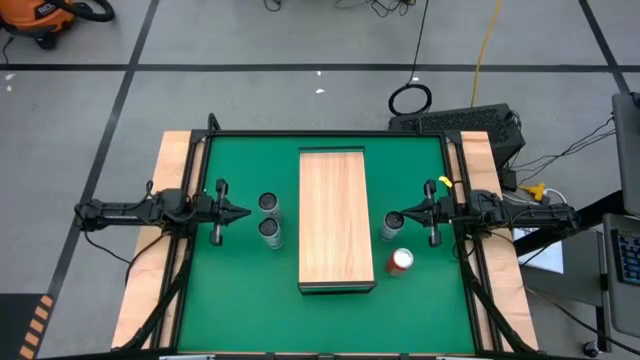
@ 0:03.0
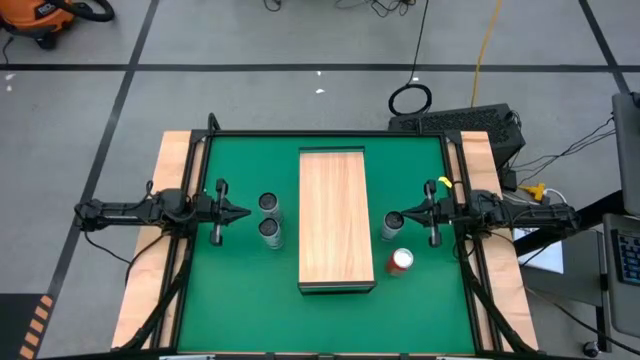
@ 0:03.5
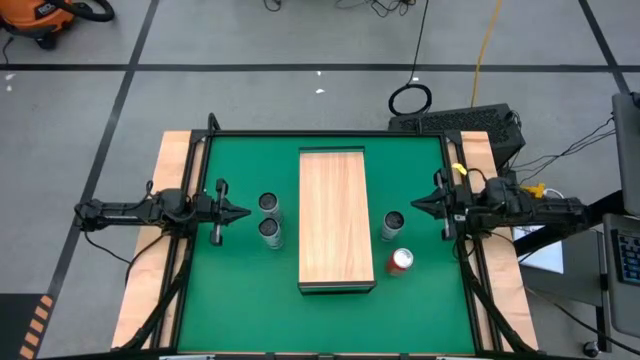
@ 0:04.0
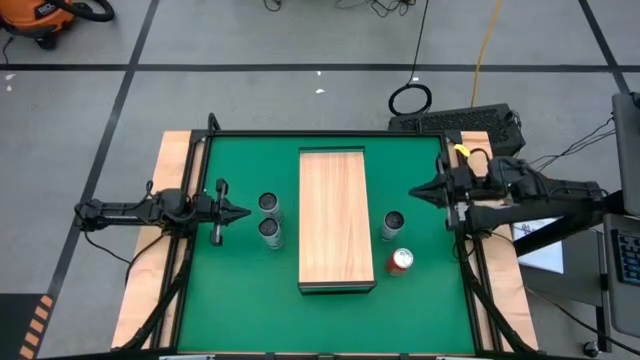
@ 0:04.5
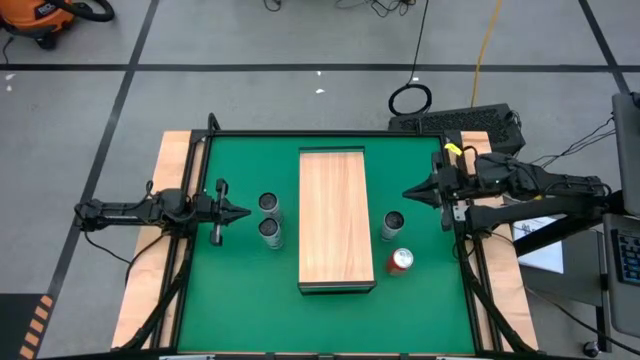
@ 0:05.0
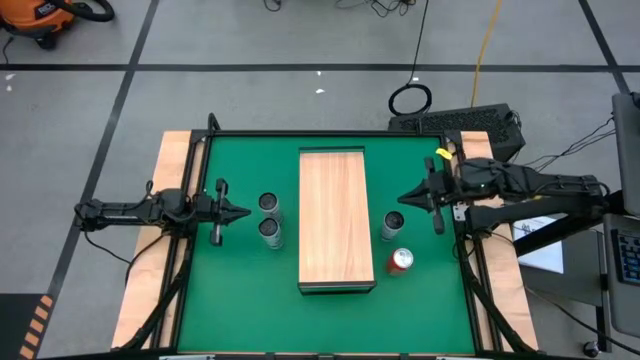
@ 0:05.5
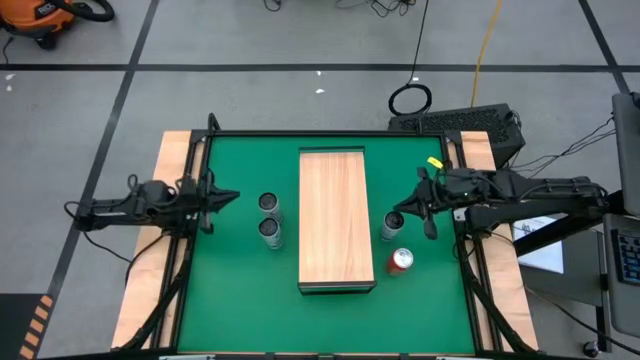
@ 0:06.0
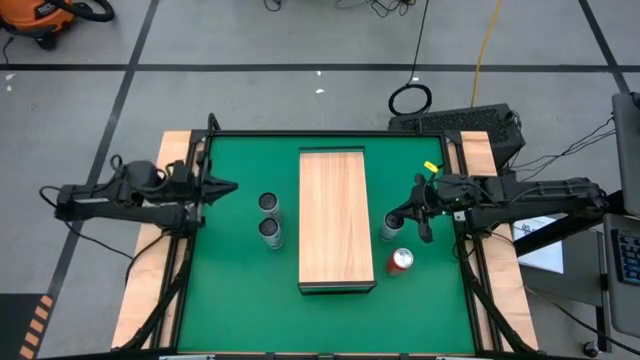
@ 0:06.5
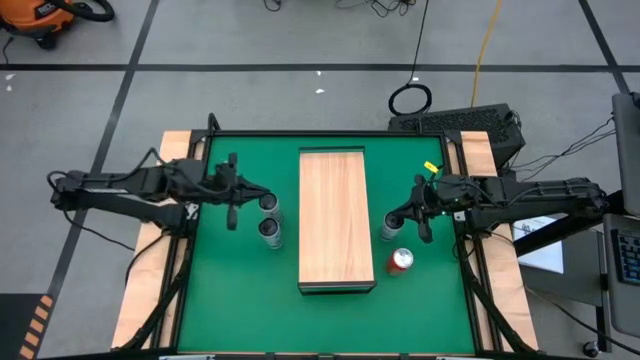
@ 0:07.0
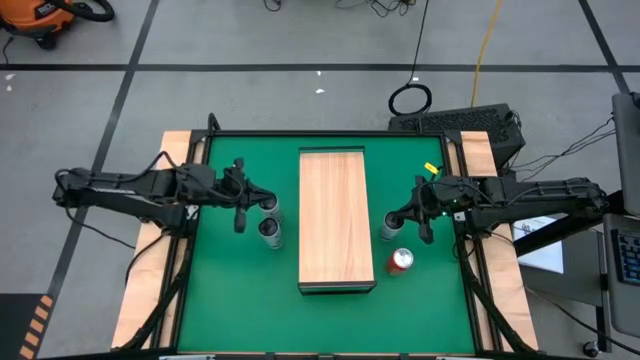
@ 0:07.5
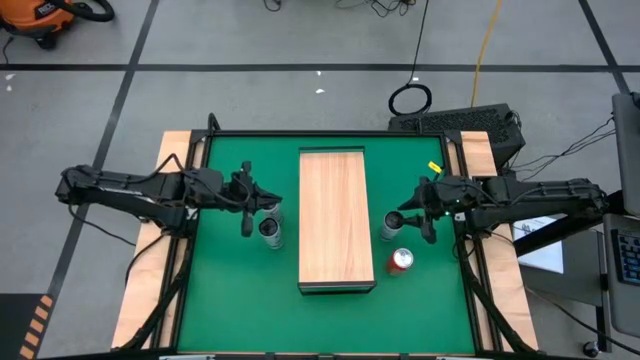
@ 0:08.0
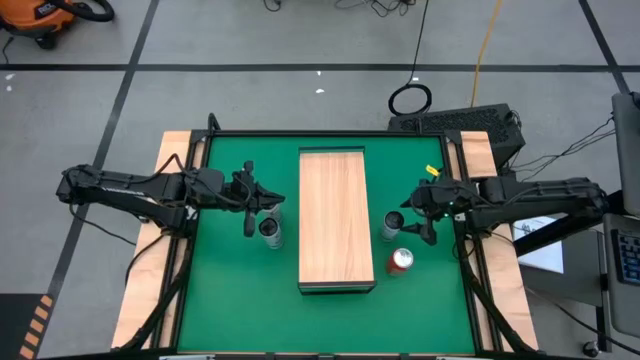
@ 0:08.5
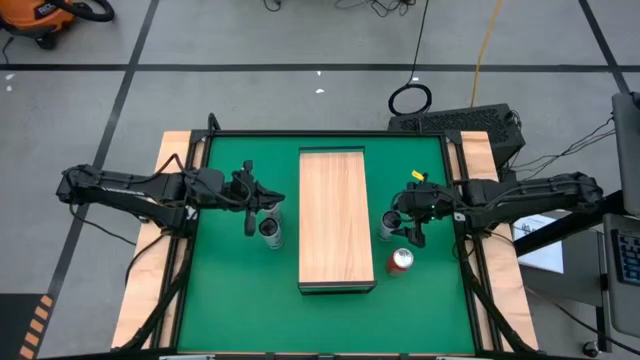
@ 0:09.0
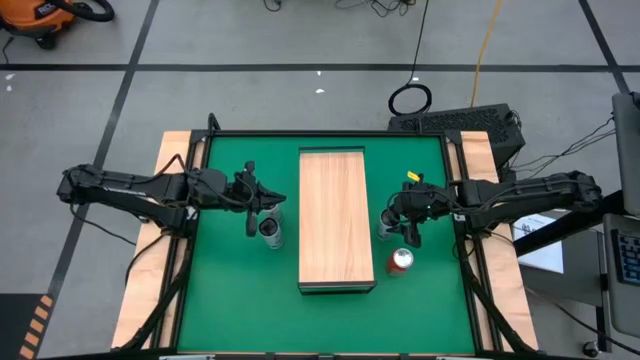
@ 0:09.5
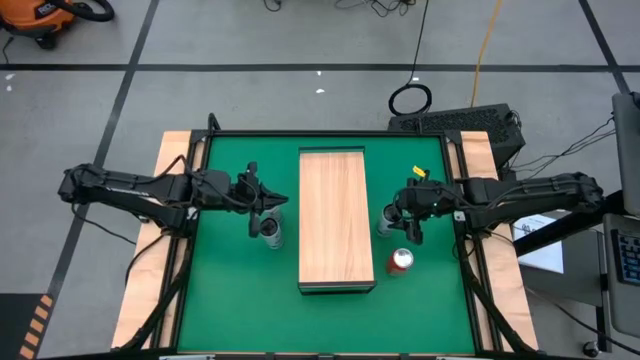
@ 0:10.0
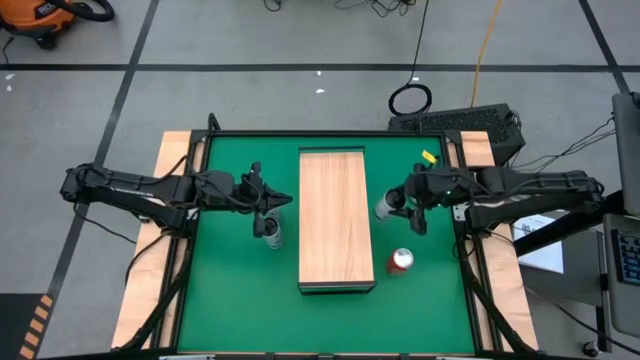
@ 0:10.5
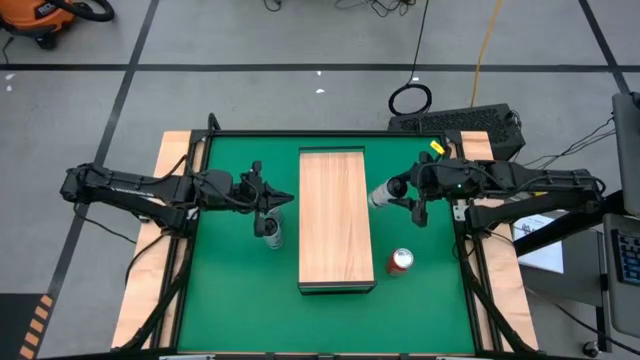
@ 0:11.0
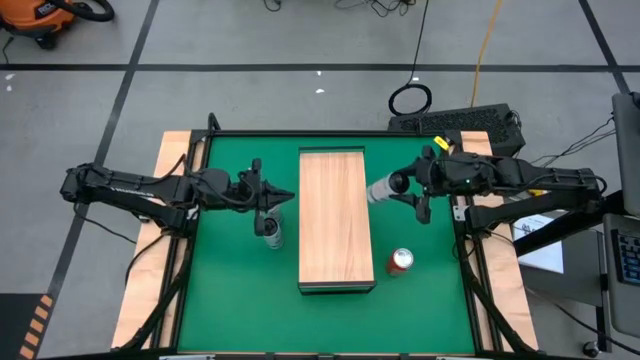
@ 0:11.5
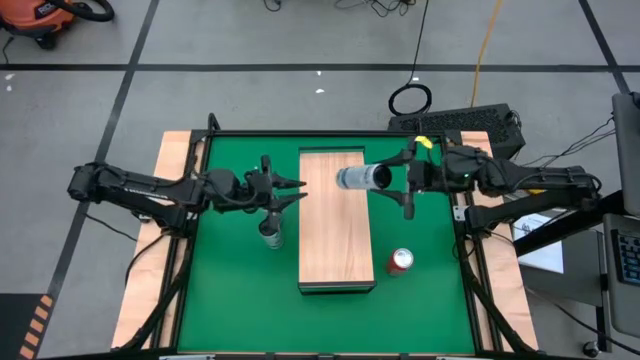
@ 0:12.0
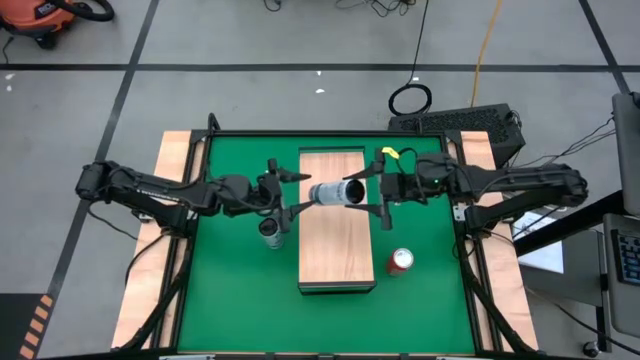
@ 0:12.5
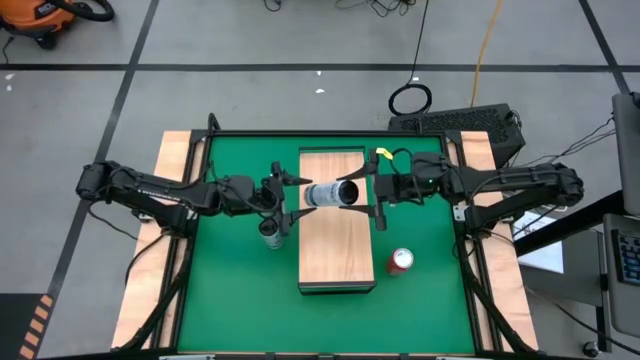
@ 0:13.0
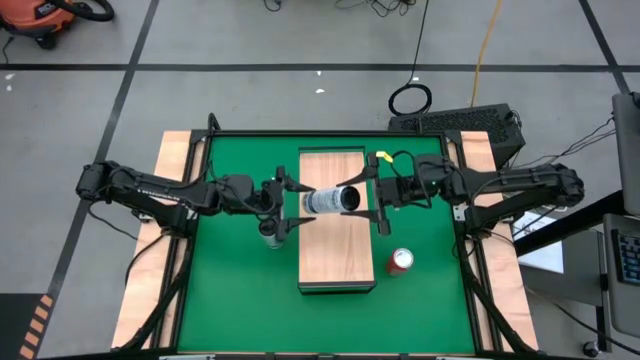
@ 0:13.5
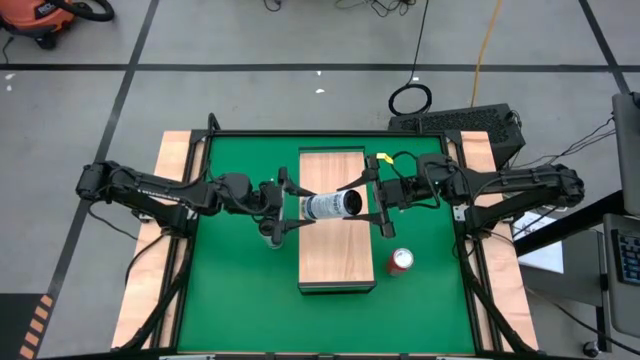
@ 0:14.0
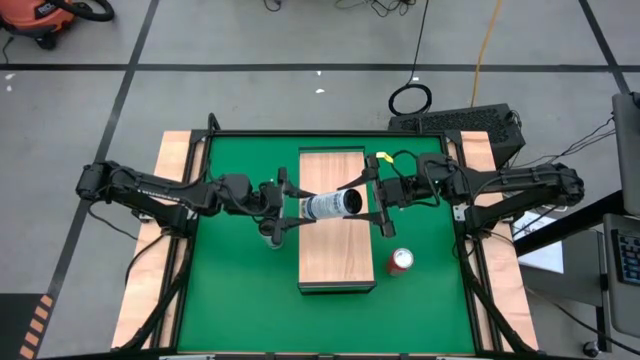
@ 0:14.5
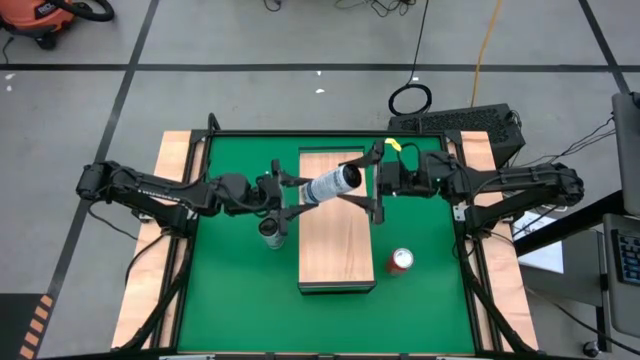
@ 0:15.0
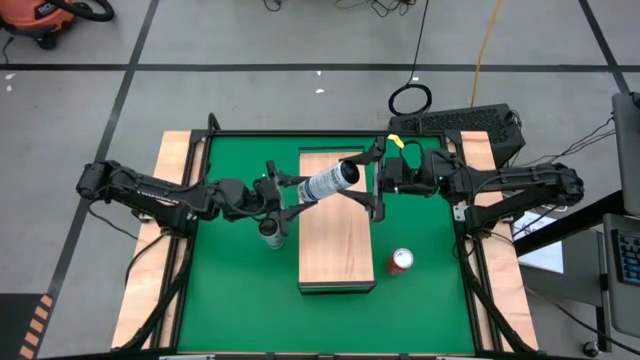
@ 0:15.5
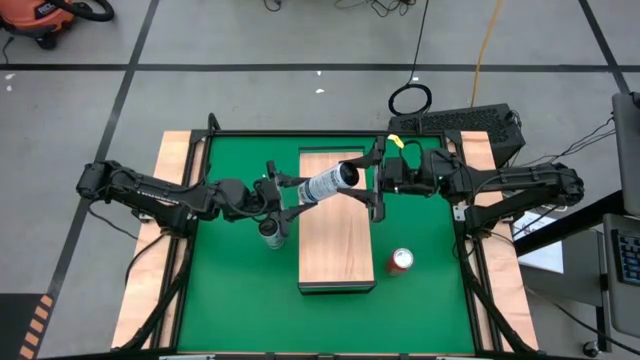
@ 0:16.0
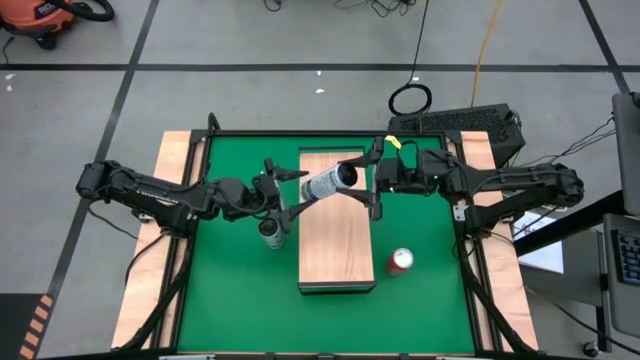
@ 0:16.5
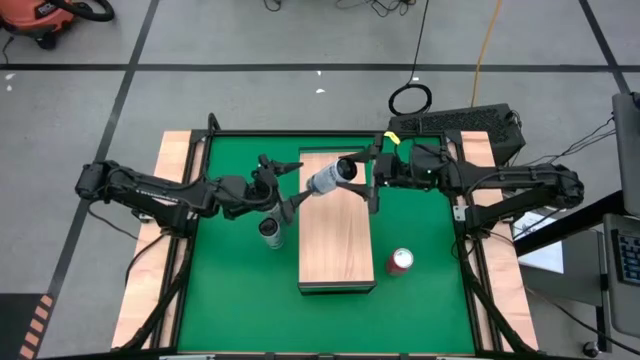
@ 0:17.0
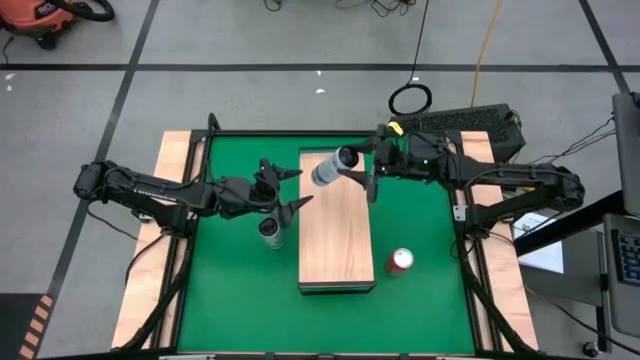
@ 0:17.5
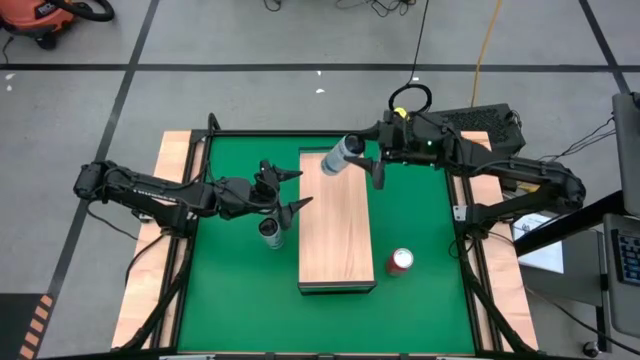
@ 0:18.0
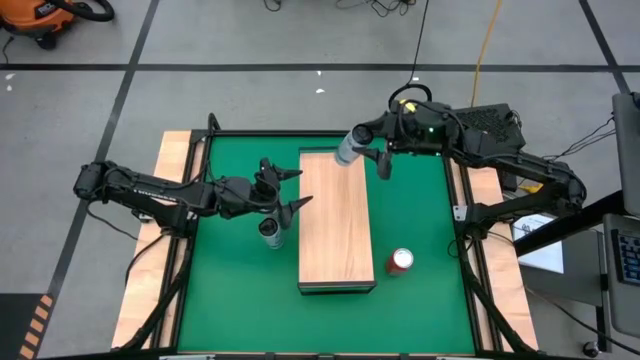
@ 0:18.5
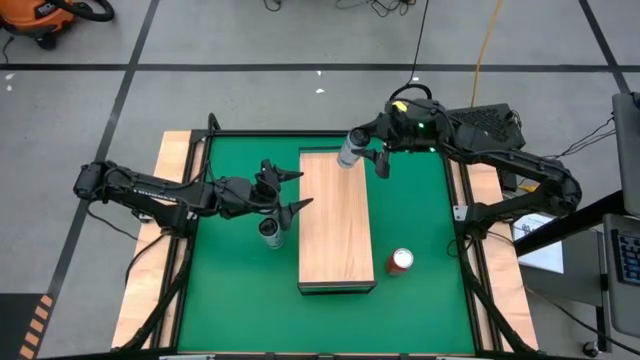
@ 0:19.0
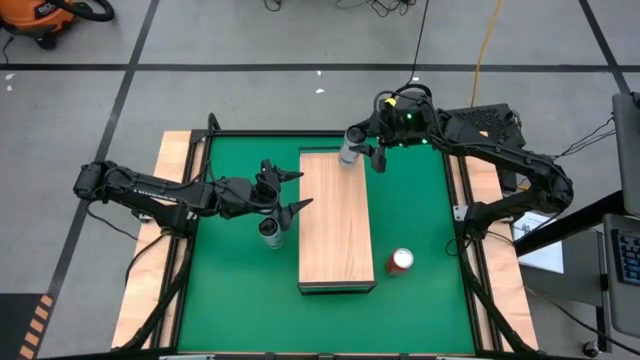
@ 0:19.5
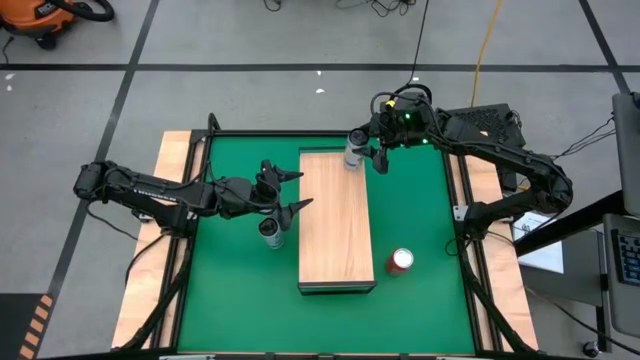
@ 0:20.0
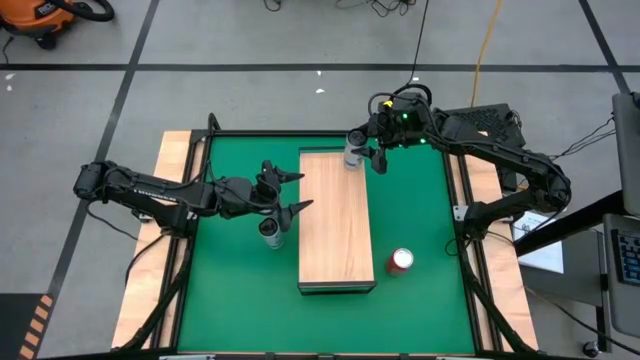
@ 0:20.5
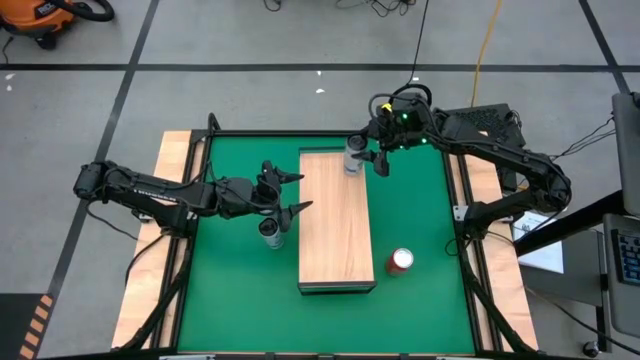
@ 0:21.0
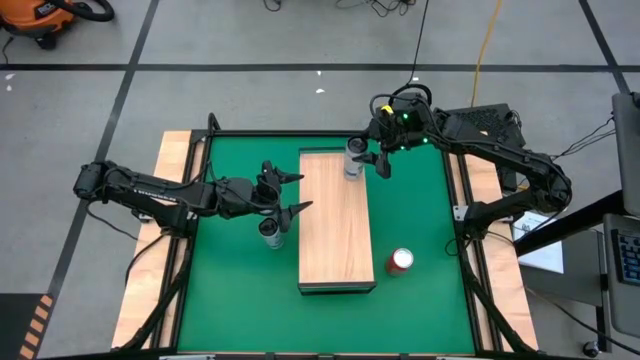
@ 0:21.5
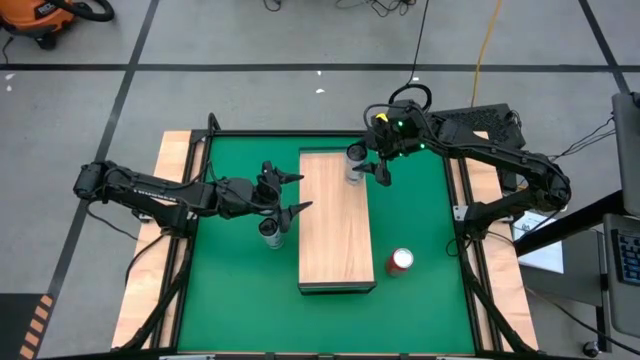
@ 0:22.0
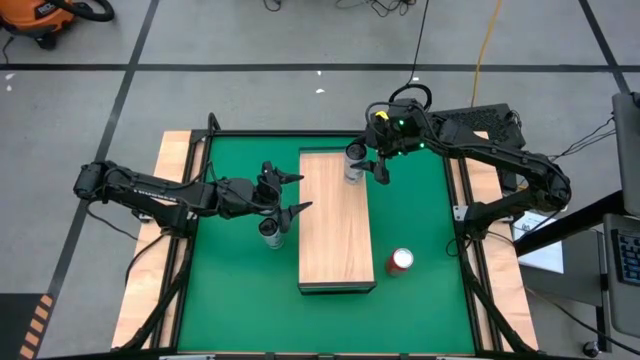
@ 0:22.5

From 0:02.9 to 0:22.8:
Task: Place canned beverage on shelf
Put the right white-blue soda can on the shelf
